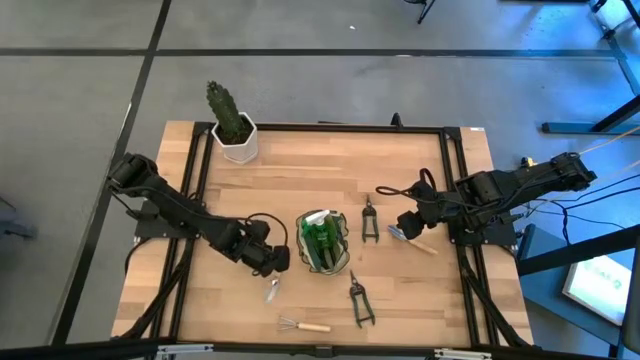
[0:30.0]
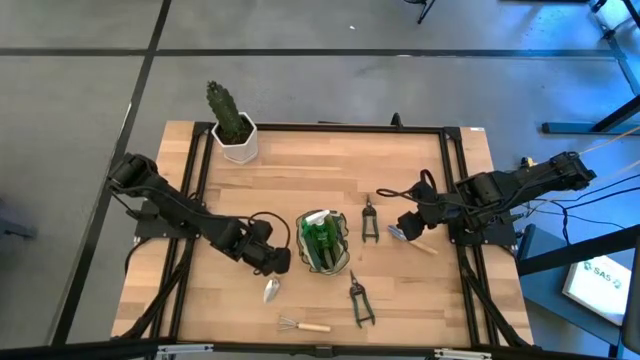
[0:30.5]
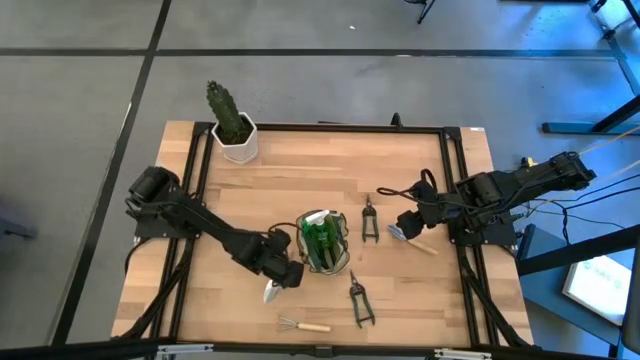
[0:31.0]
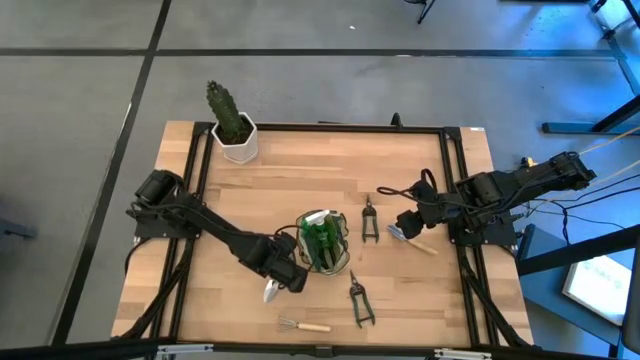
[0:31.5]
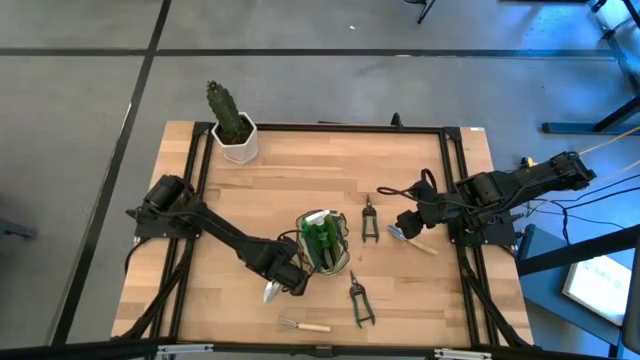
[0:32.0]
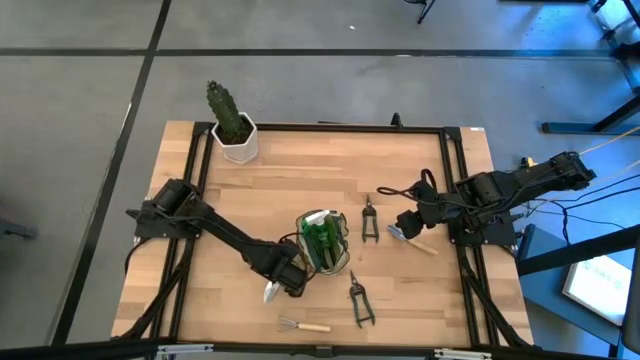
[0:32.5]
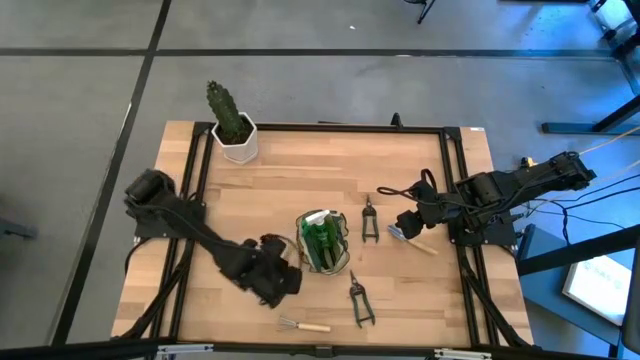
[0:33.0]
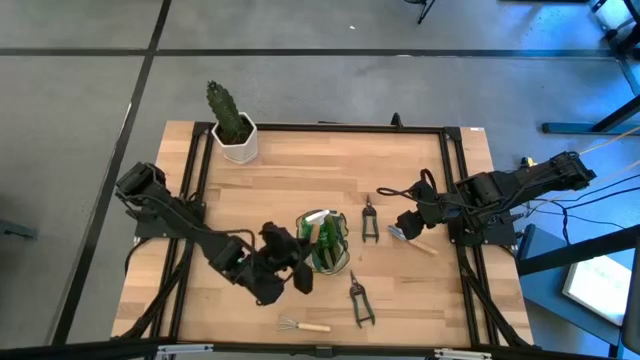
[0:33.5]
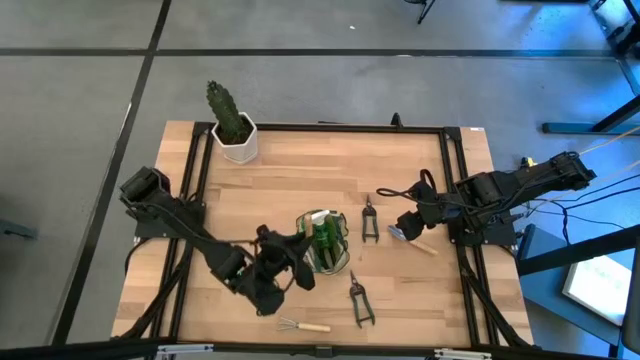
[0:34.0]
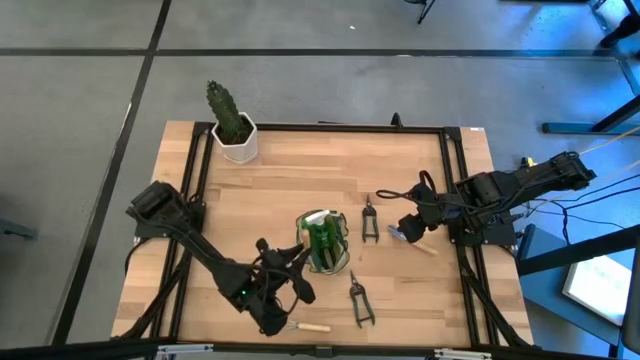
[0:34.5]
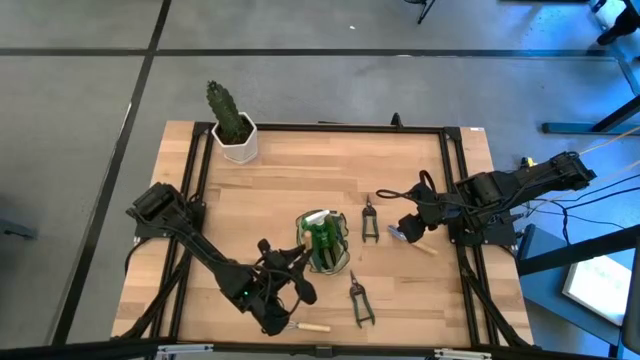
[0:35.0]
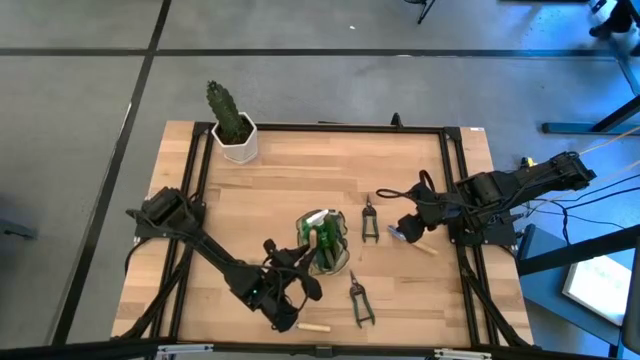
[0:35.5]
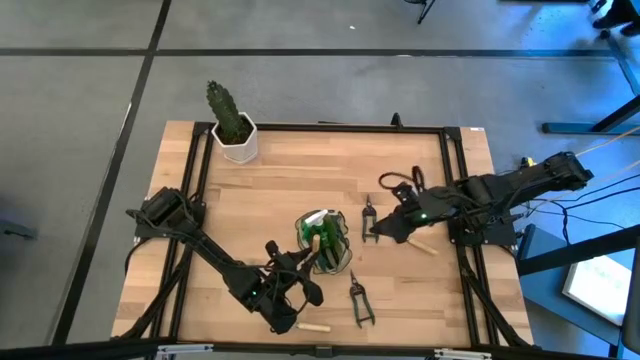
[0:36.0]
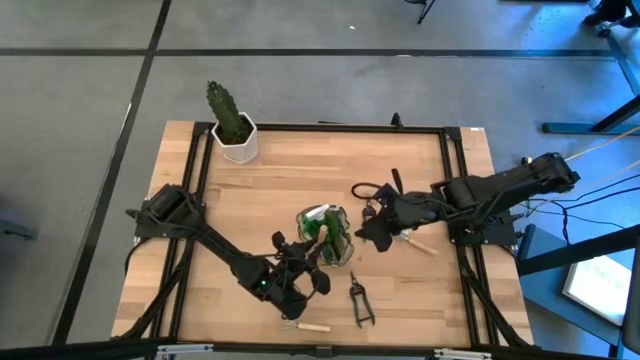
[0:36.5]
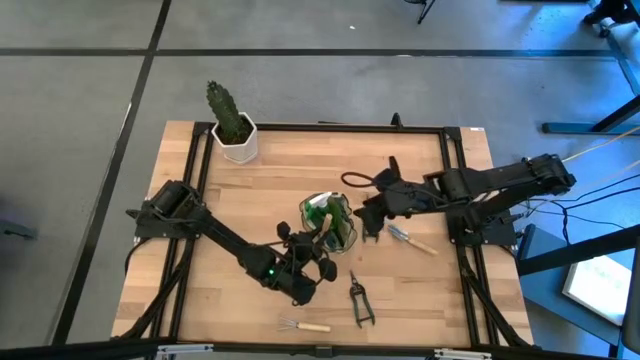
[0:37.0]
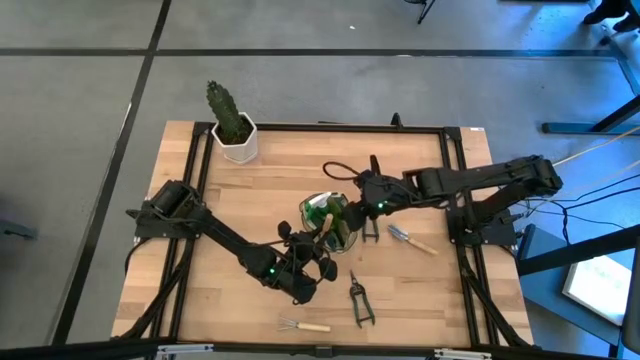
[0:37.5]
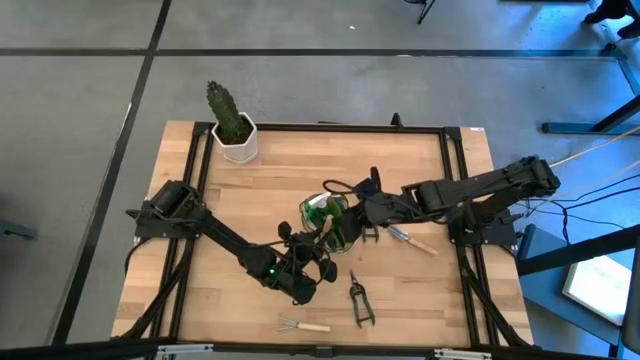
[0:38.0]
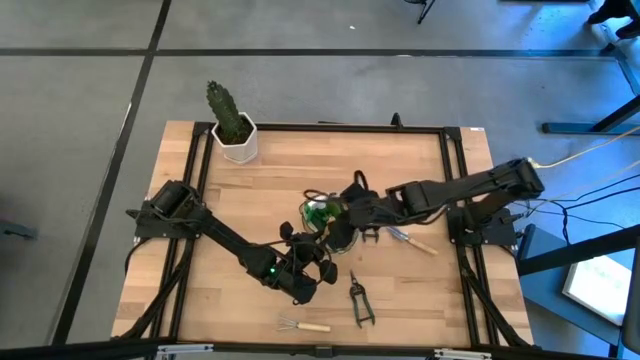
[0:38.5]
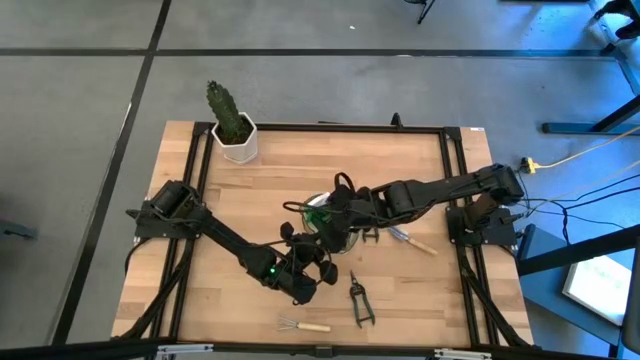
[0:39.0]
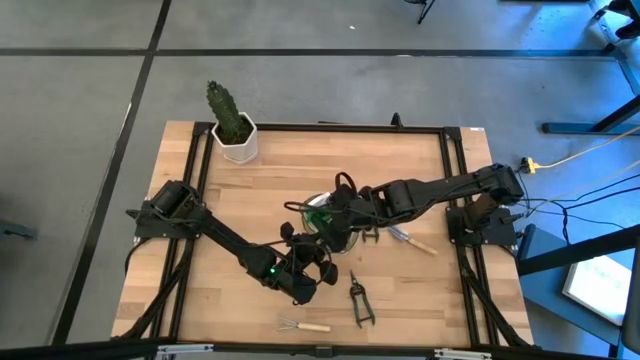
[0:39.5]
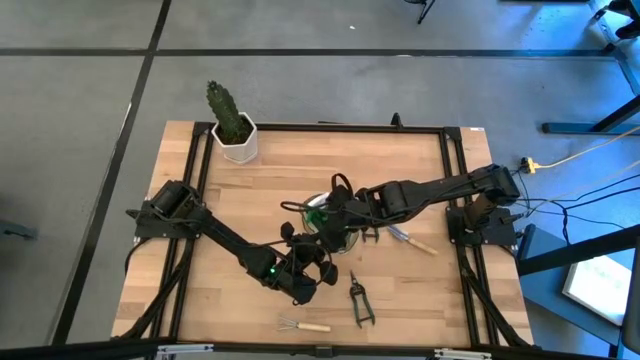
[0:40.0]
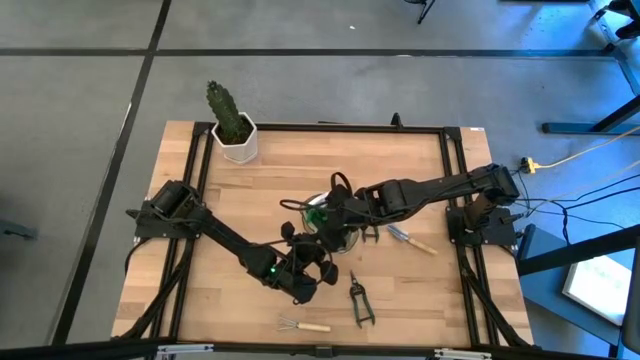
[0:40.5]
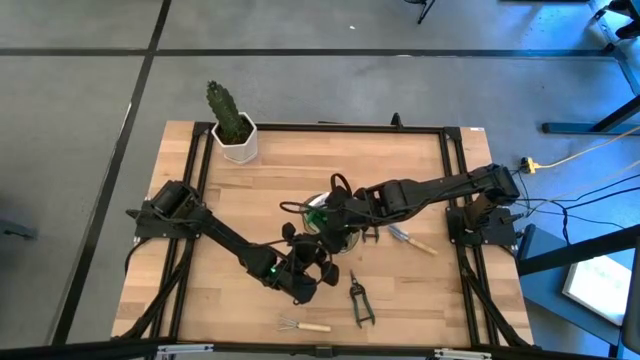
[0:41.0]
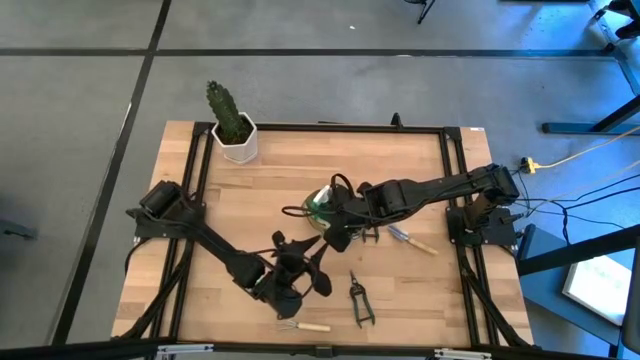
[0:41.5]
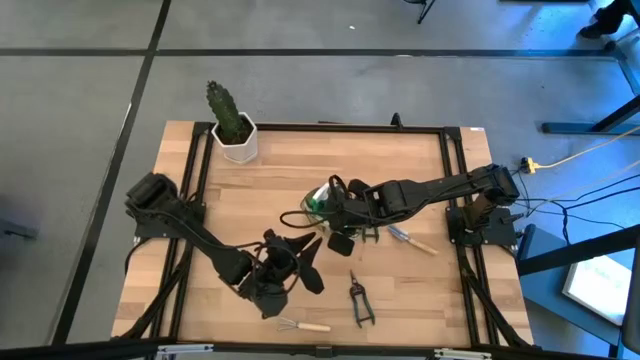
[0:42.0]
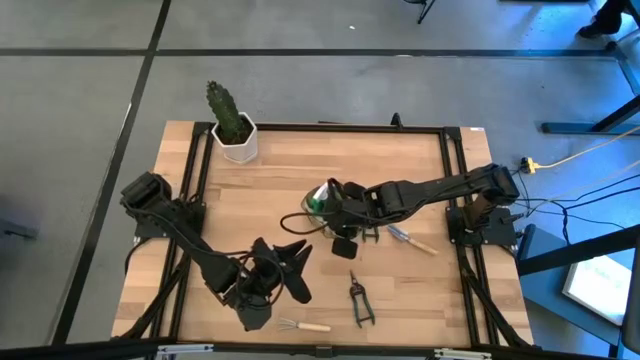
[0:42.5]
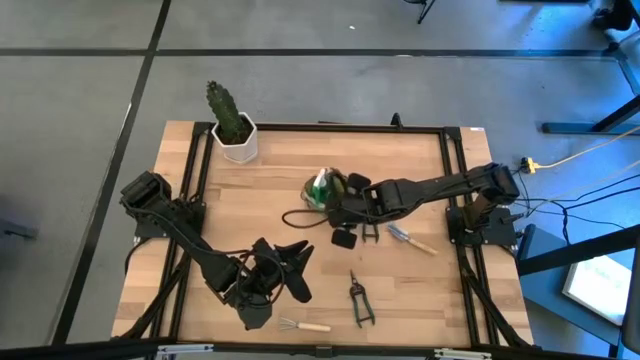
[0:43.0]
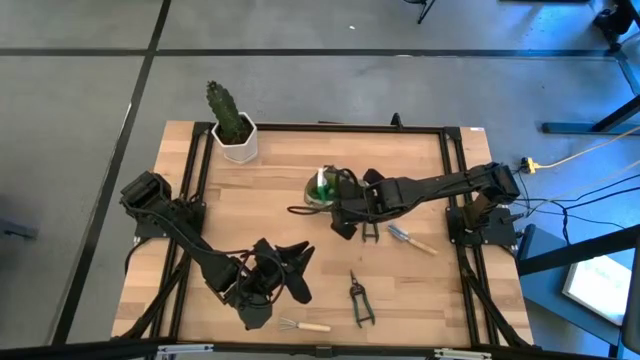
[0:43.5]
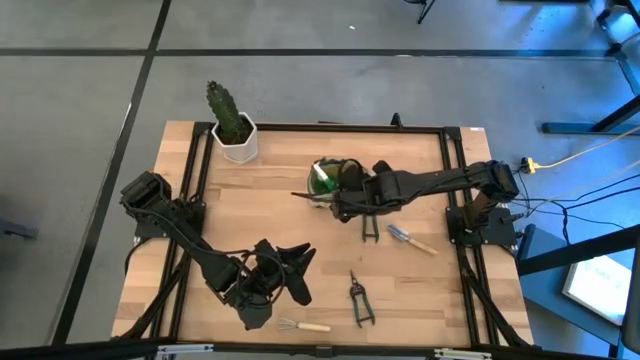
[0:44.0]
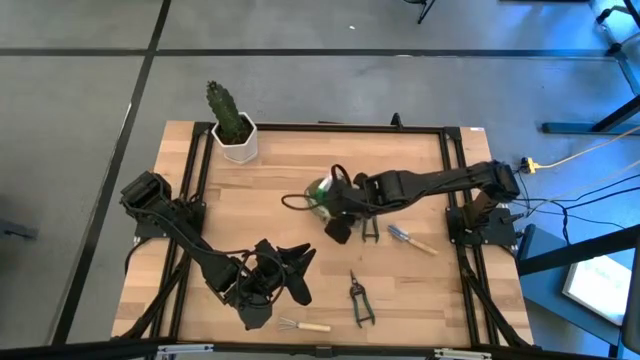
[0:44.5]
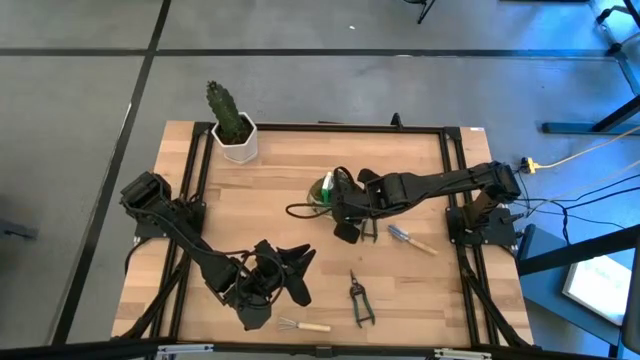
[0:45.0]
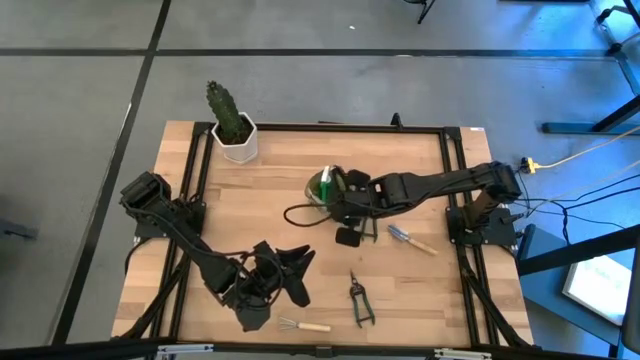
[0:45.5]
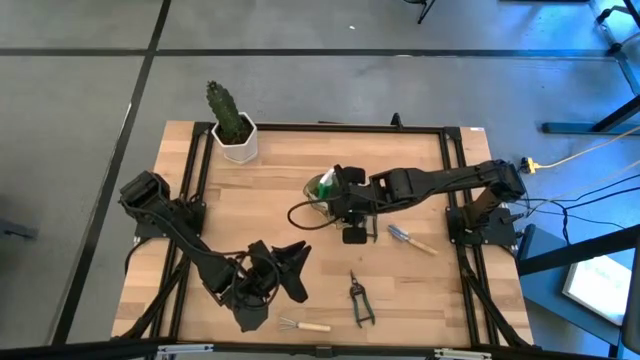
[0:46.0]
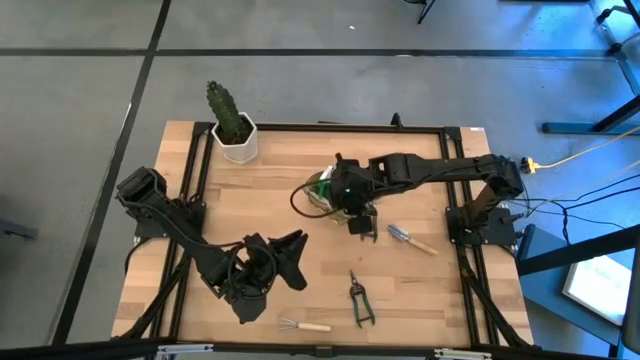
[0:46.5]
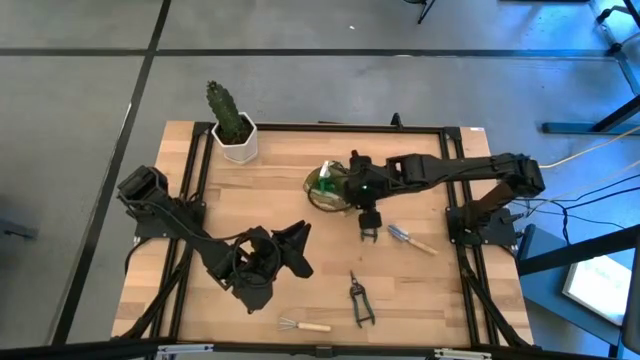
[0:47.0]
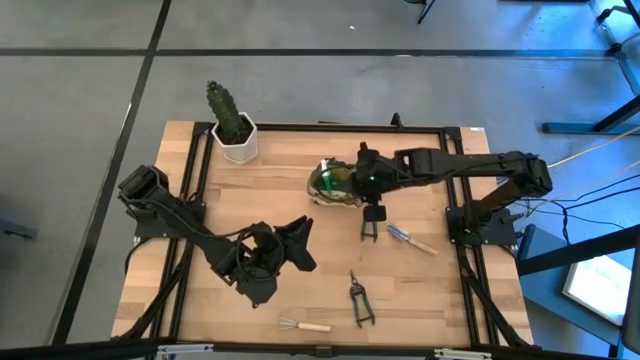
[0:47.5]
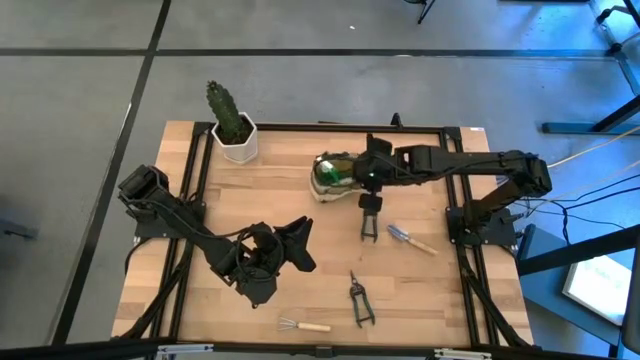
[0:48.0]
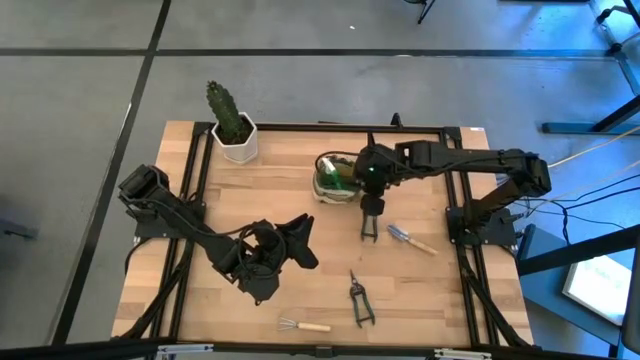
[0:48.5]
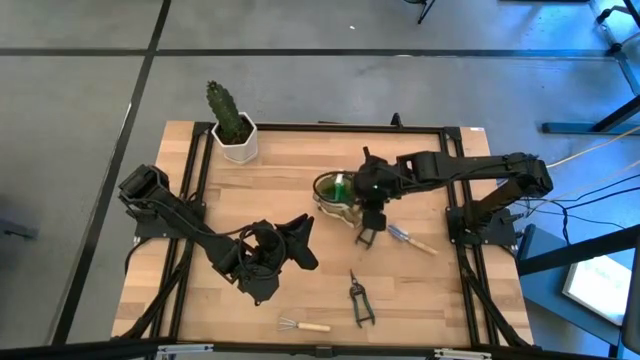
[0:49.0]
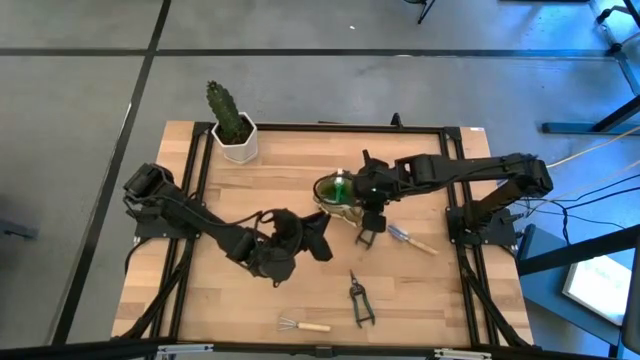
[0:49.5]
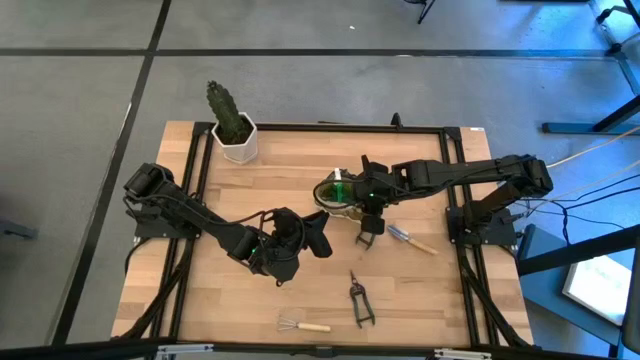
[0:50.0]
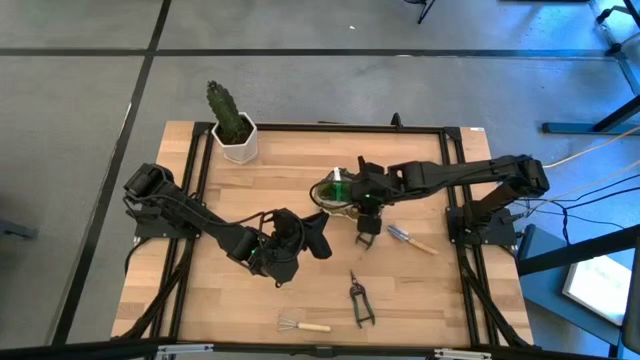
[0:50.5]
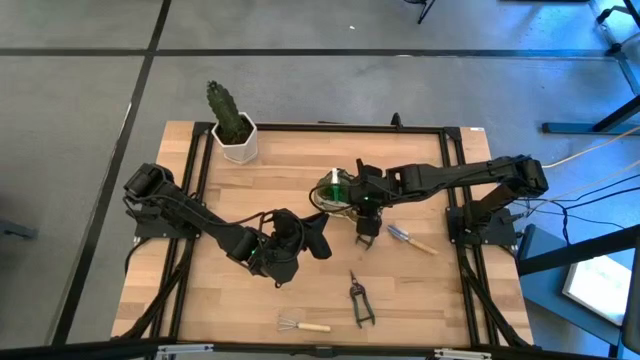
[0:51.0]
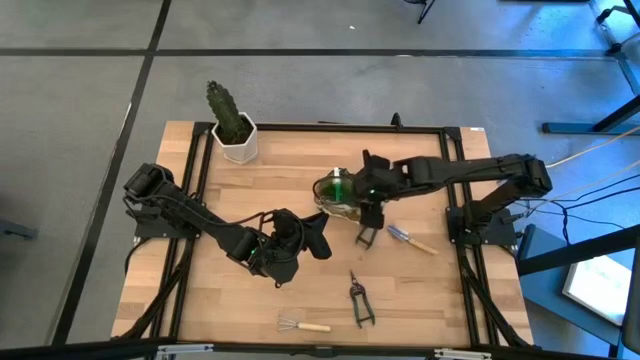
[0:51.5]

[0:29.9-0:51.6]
Task: Pick & Place Garden tools in Gardening bag
Put the left trowel into the gardening bag
